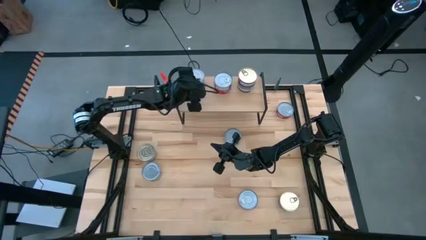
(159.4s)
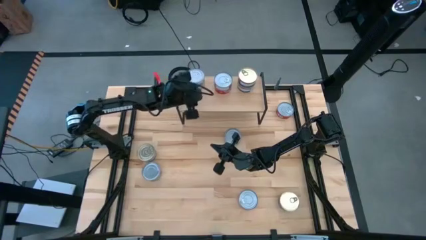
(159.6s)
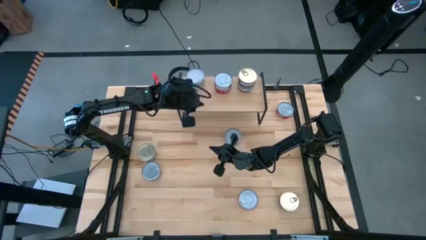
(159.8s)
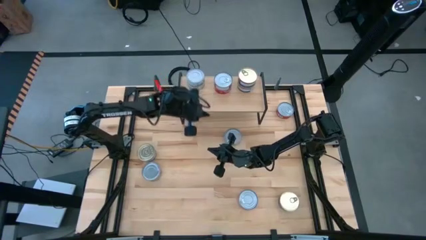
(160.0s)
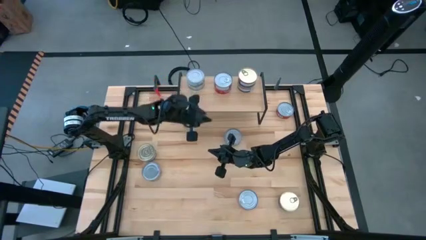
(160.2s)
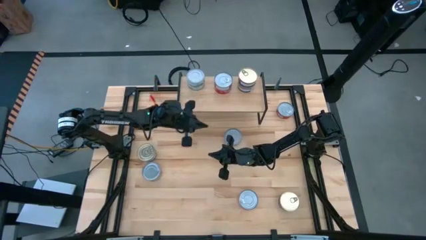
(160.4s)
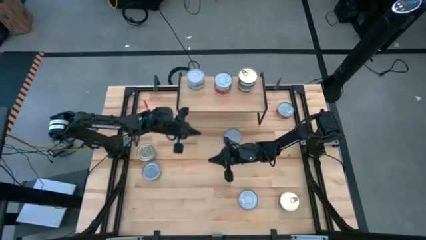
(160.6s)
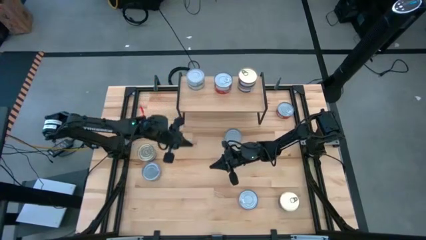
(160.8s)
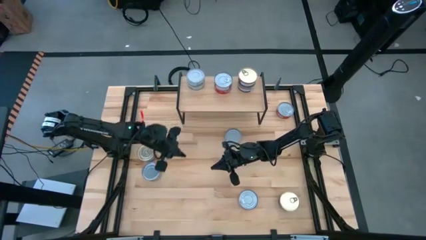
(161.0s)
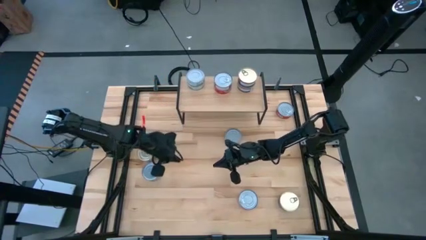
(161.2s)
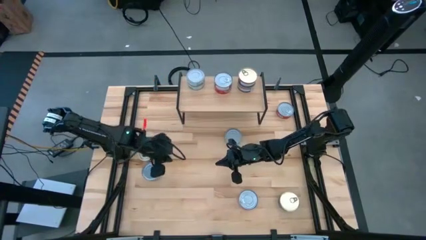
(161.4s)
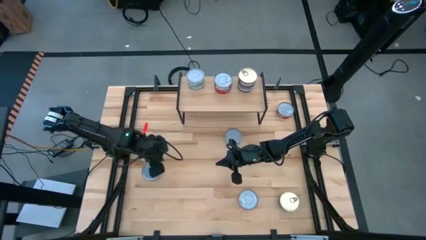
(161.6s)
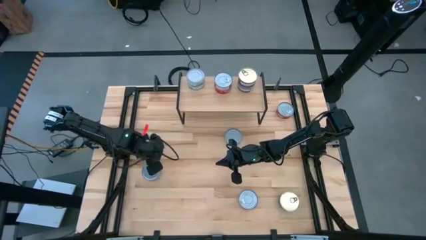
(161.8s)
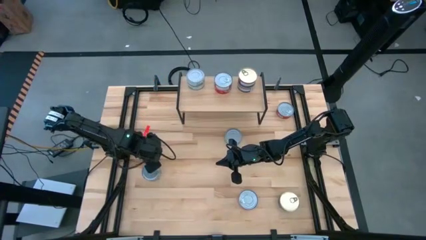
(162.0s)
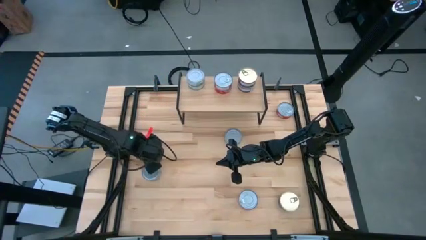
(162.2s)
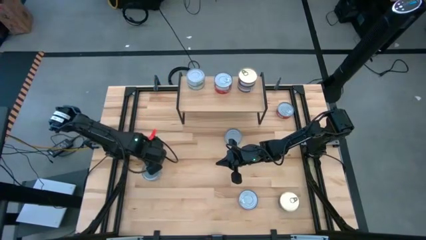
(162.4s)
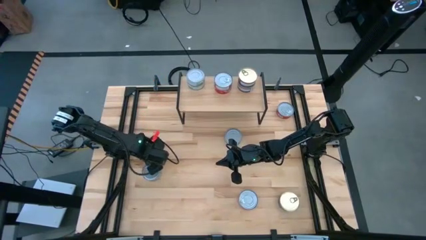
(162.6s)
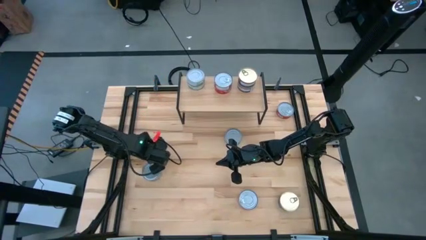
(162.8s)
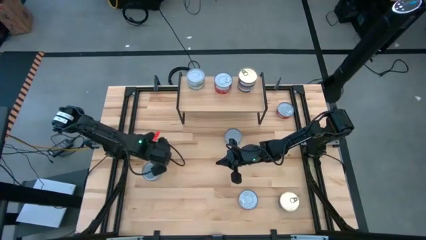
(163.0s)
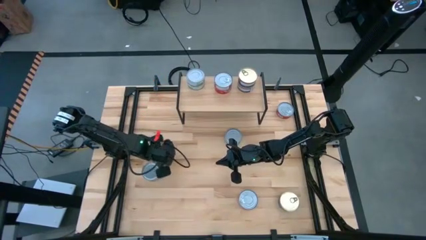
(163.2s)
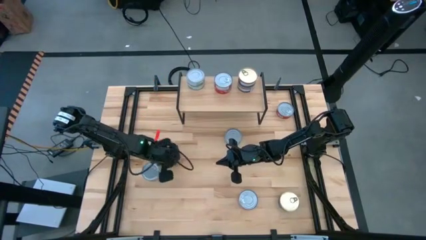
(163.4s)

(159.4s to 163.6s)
Task: Stack canned seafood by type on shelf
Put the blue and pink tuna can on the shelf aligned with the blue and pink tuna cans

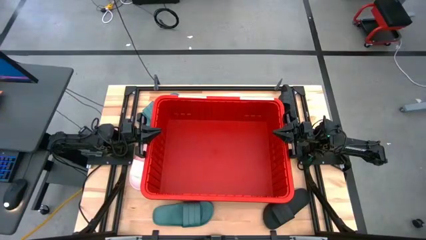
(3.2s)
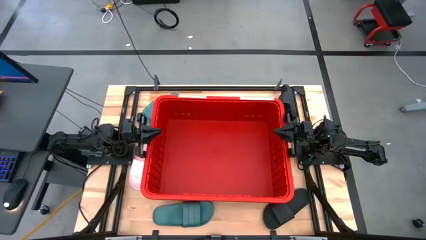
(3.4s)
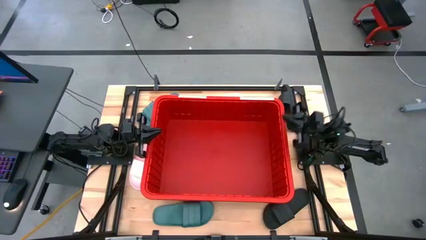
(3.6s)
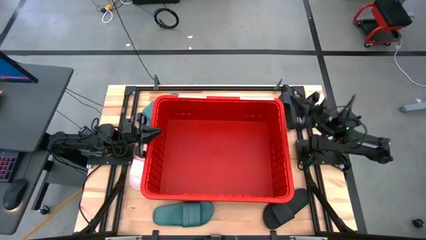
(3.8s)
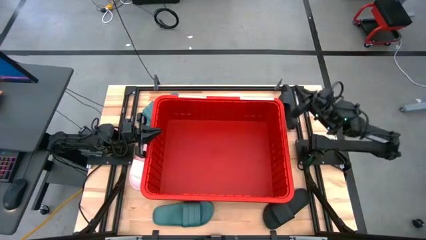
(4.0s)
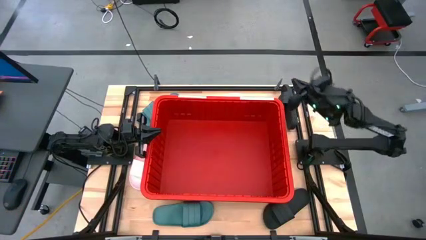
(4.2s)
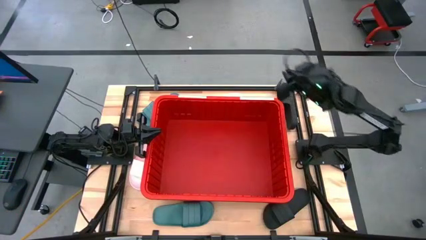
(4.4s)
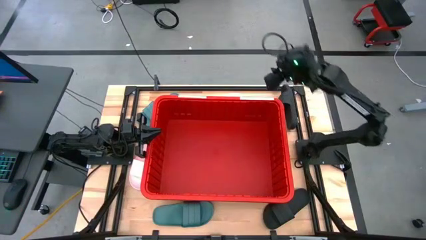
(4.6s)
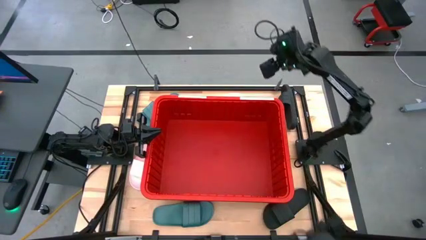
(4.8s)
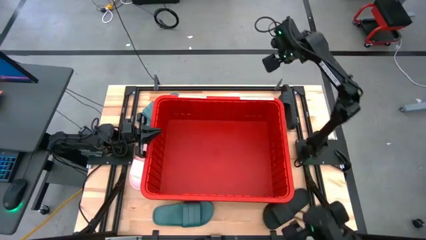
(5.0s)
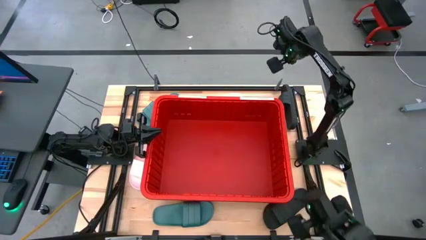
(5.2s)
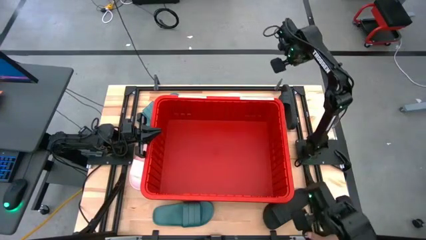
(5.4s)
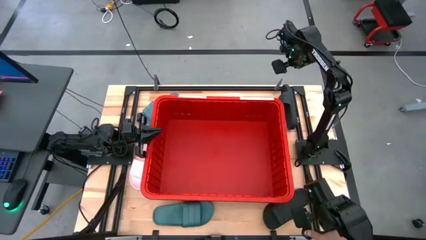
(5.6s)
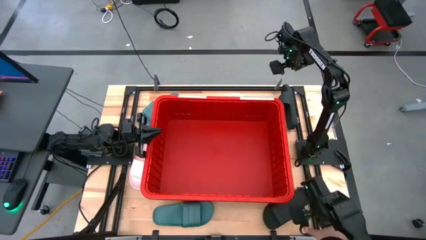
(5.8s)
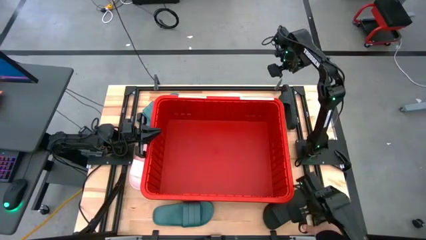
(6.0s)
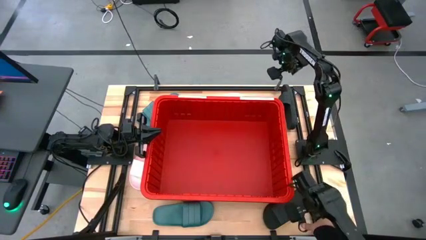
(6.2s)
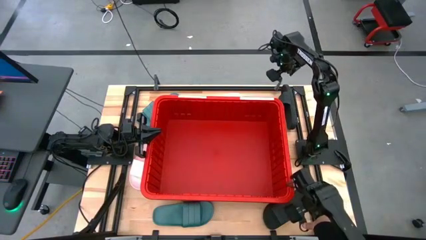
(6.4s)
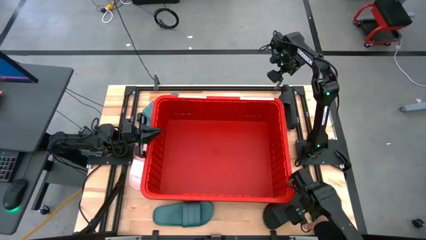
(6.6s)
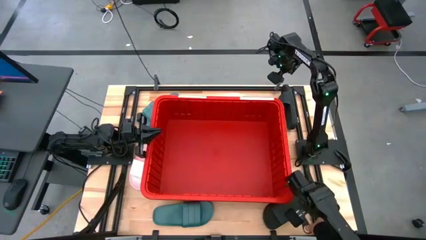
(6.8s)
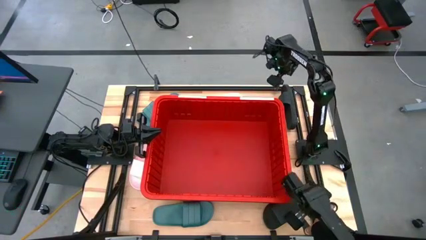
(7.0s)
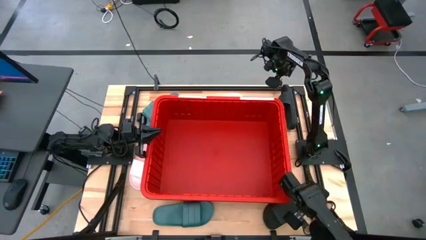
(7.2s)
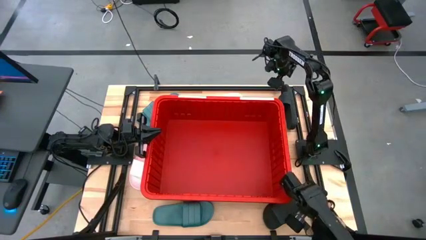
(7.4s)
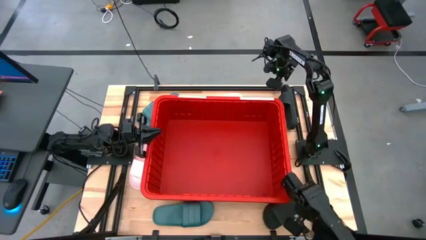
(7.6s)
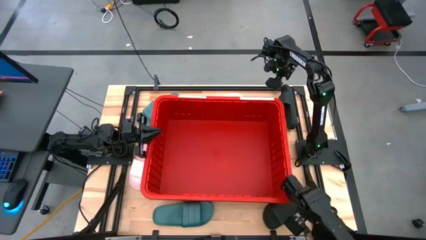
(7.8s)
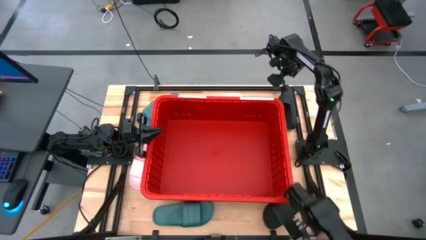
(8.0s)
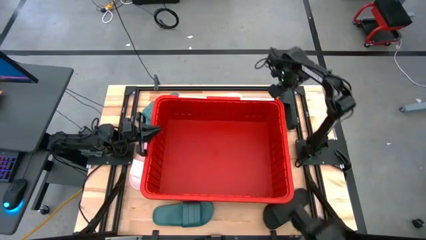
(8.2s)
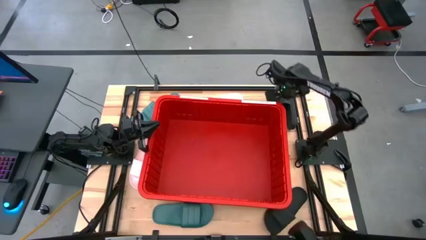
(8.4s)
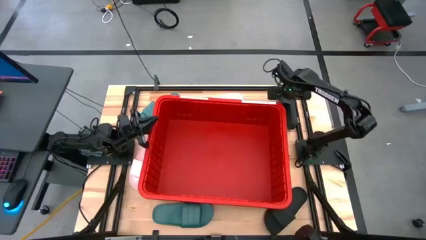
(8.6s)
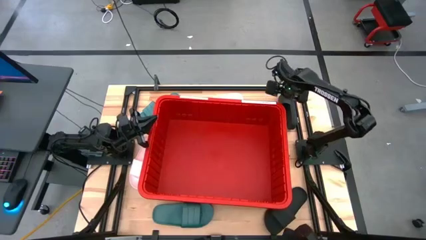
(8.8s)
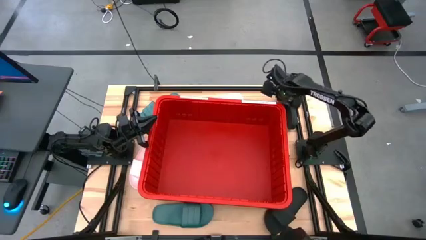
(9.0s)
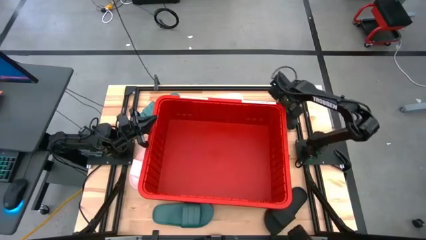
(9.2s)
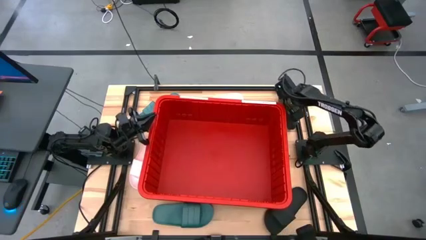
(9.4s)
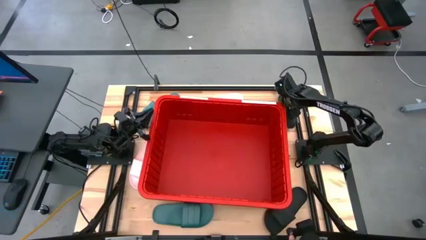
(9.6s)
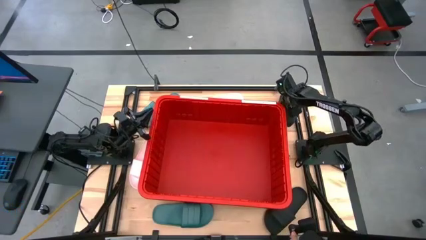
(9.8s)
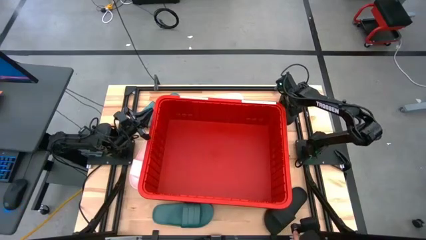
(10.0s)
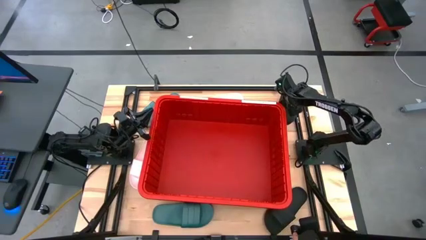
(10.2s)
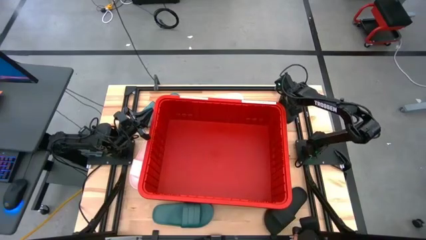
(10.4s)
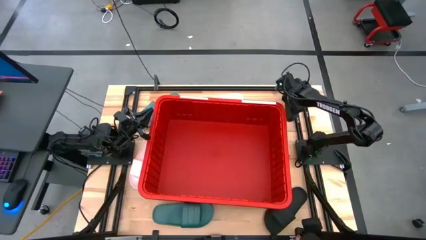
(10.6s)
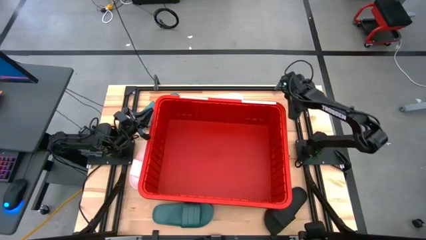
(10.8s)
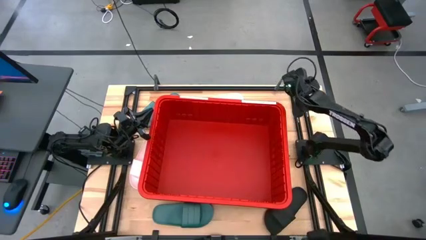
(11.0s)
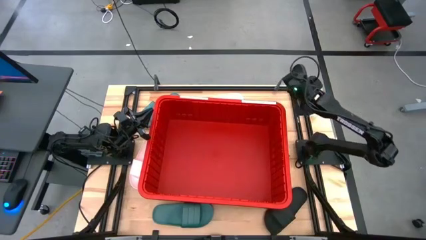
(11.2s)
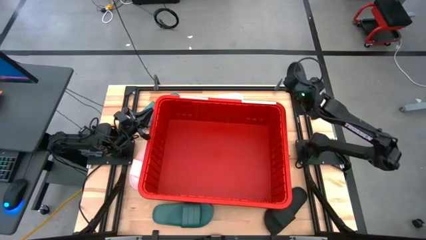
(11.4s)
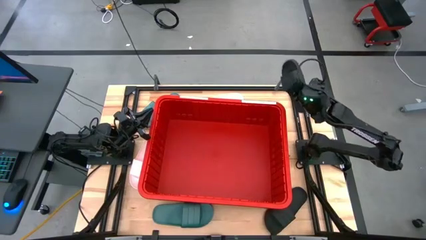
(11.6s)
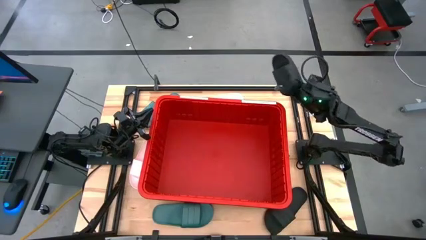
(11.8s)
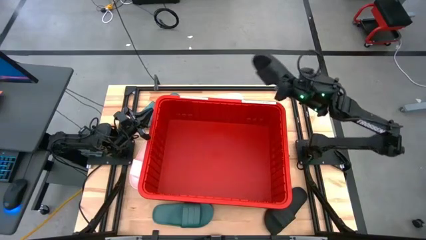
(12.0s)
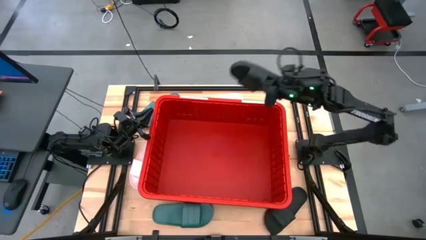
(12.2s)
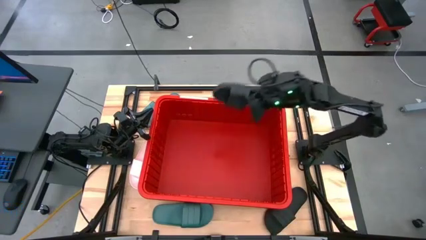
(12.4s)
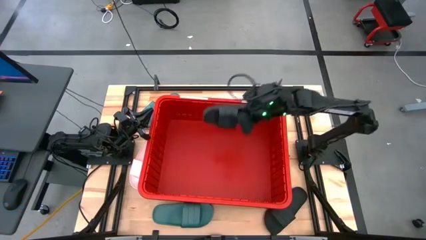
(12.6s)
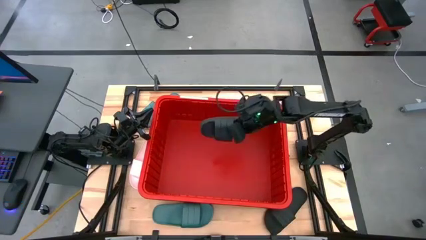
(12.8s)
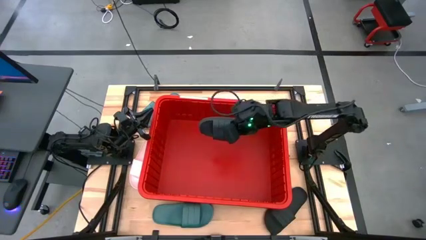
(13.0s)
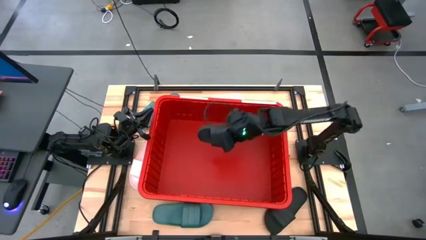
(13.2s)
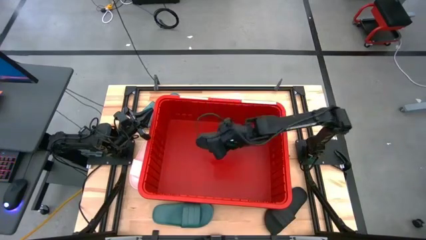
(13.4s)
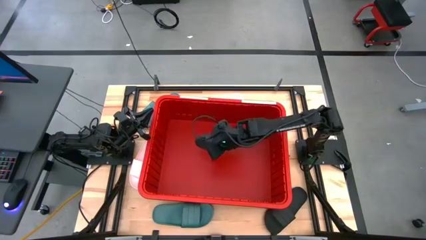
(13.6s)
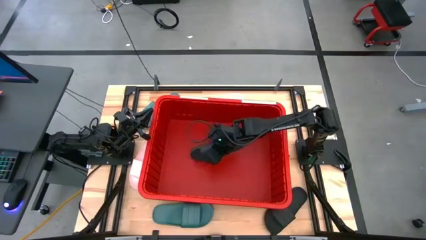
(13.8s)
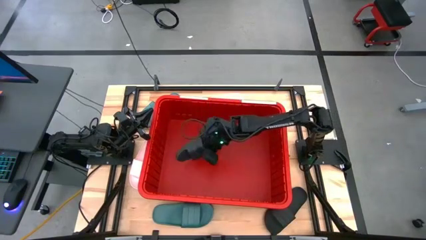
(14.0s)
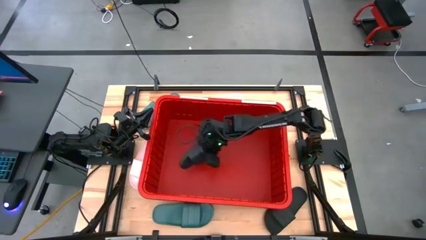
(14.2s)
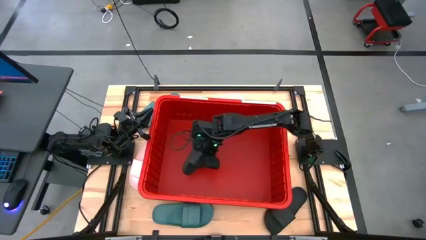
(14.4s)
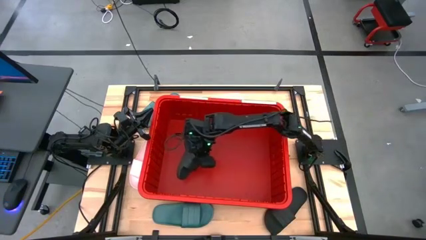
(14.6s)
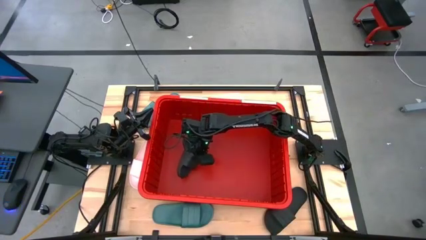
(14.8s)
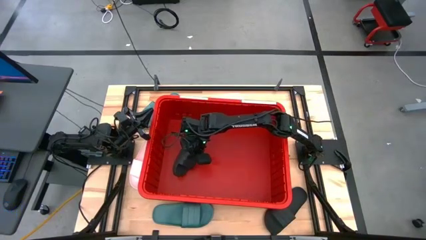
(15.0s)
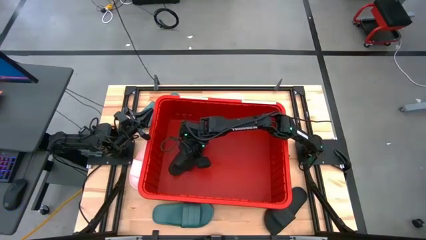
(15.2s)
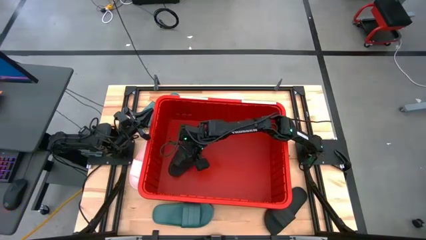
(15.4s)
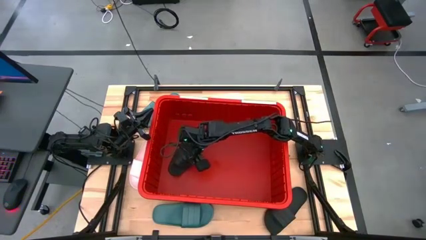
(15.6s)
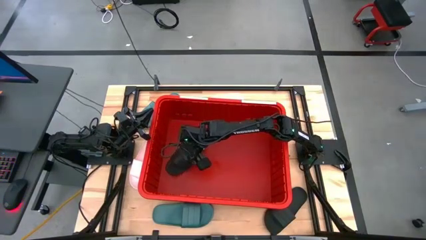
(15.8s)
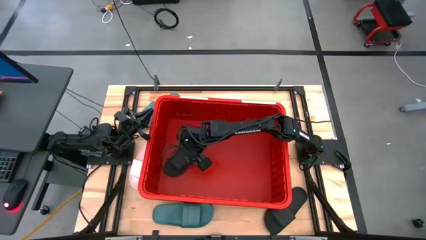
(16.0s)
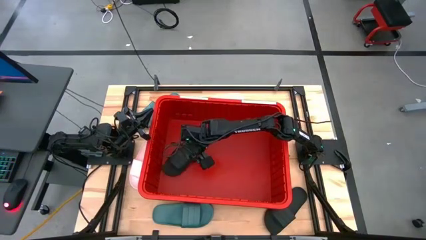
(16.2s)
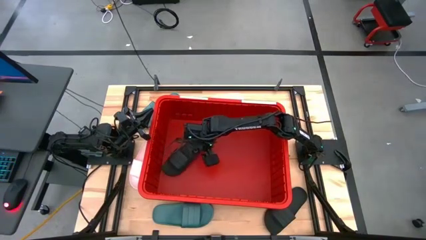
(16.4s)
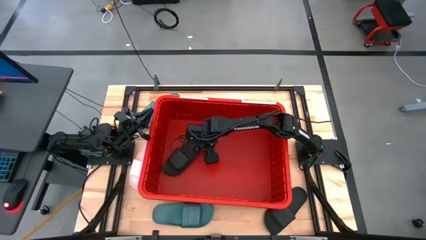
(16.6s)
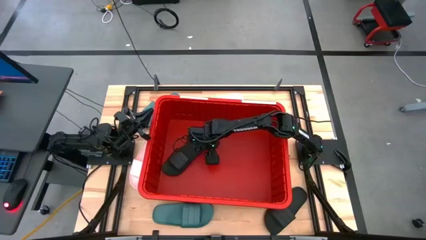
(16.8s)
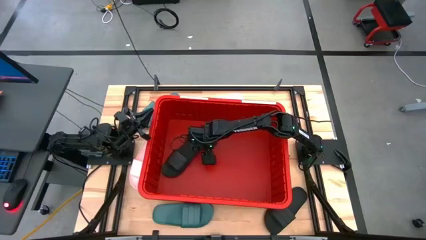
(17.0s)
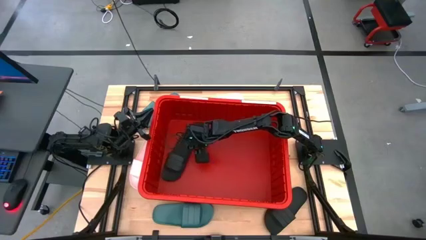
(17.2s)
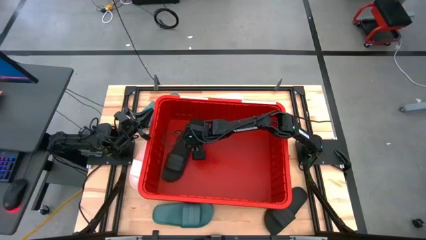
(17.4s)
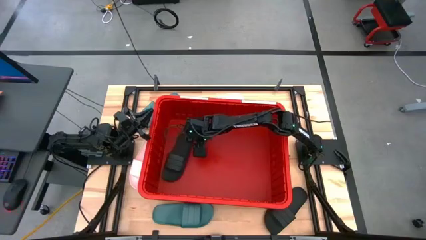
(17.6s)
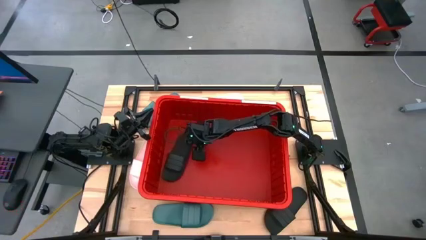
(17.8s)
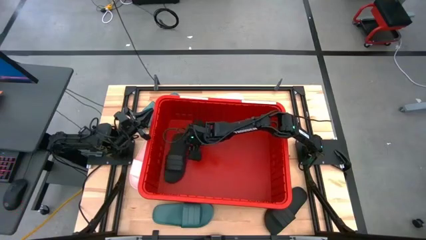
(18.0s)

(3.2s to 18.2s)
Task: Pick and place slides into bin
Put the top black slide into the left side of the container
